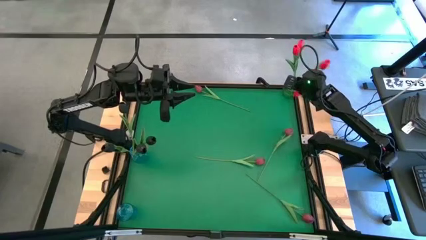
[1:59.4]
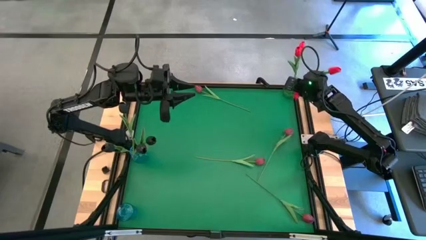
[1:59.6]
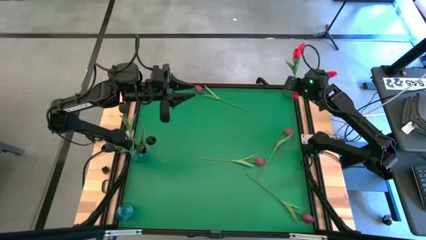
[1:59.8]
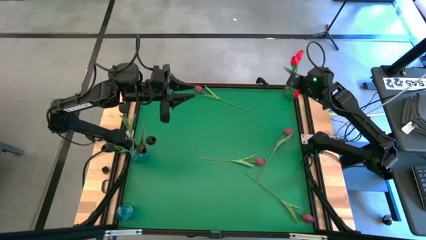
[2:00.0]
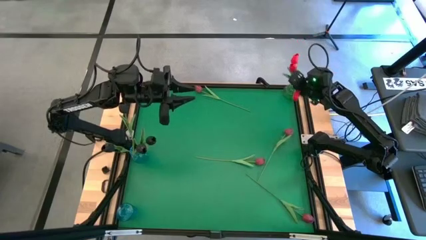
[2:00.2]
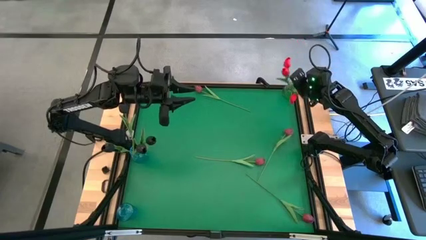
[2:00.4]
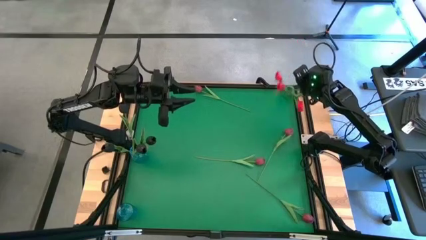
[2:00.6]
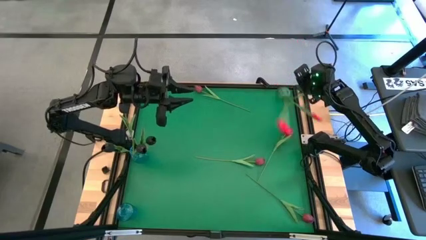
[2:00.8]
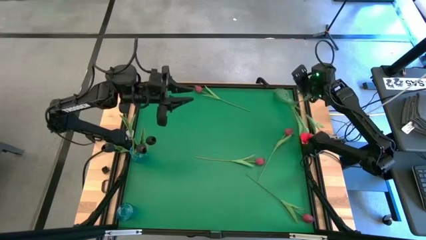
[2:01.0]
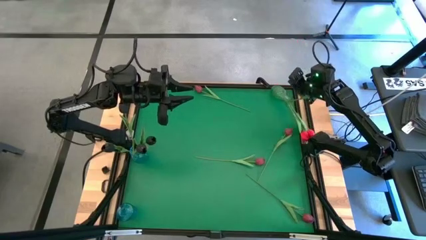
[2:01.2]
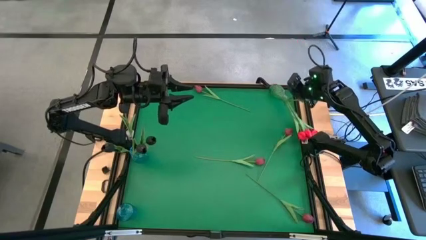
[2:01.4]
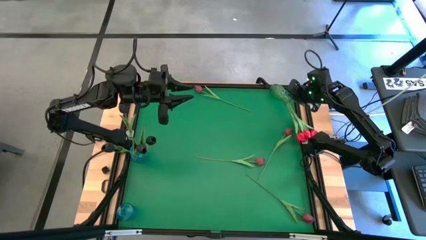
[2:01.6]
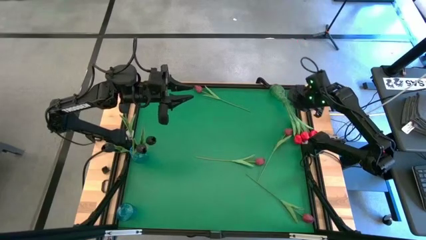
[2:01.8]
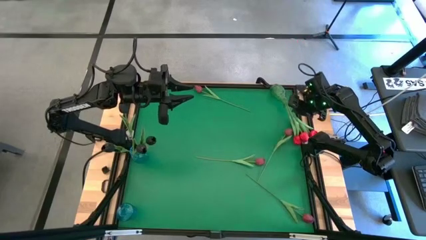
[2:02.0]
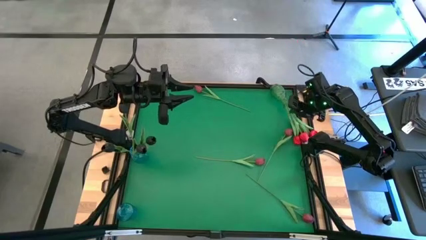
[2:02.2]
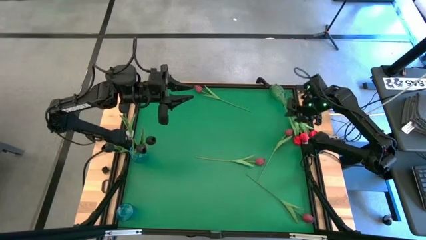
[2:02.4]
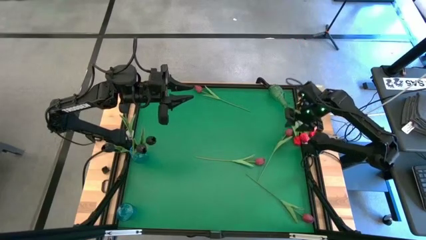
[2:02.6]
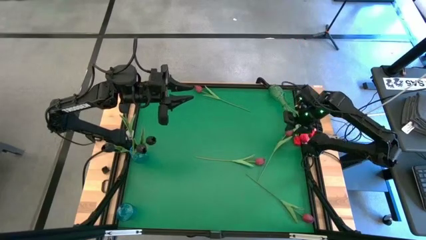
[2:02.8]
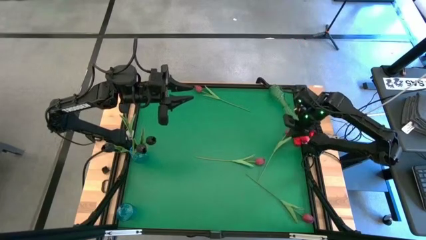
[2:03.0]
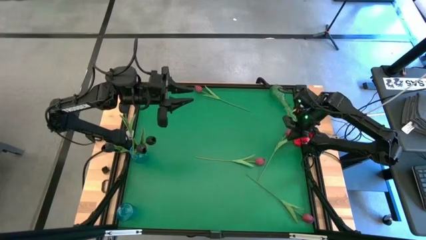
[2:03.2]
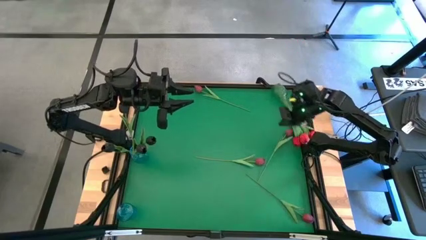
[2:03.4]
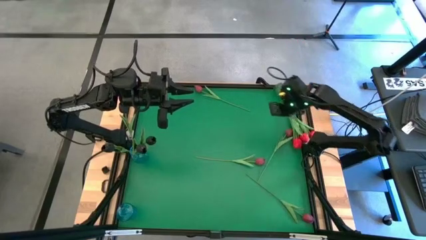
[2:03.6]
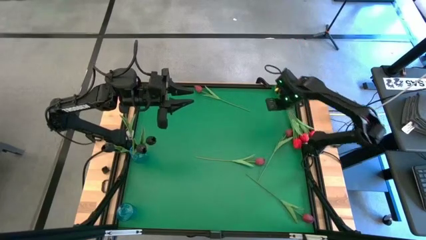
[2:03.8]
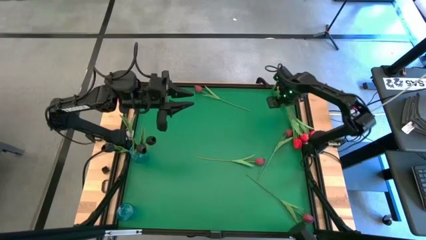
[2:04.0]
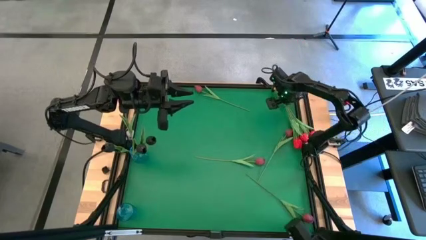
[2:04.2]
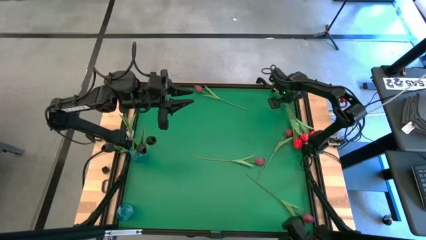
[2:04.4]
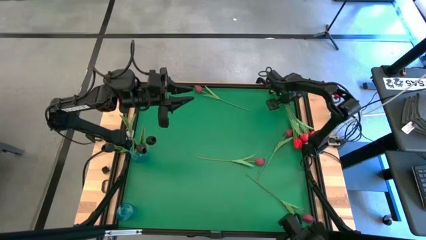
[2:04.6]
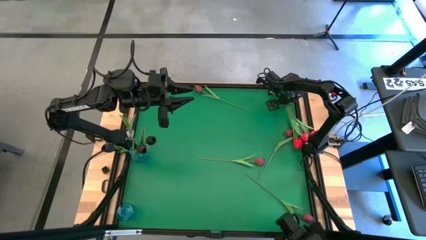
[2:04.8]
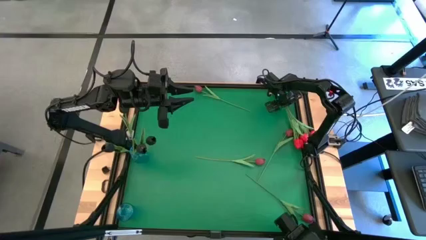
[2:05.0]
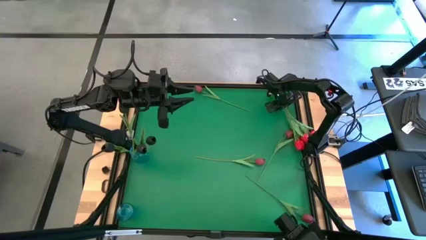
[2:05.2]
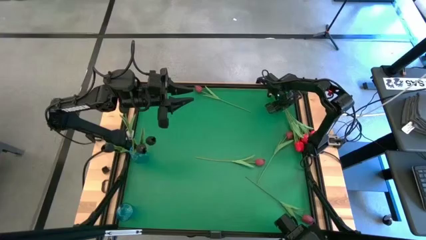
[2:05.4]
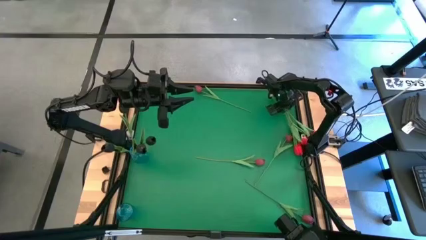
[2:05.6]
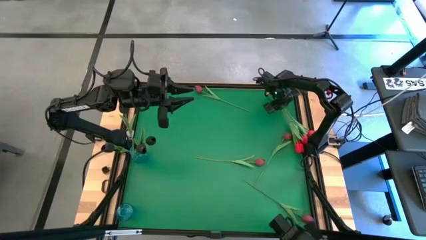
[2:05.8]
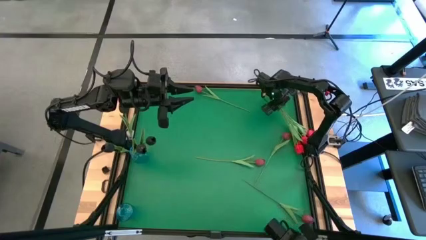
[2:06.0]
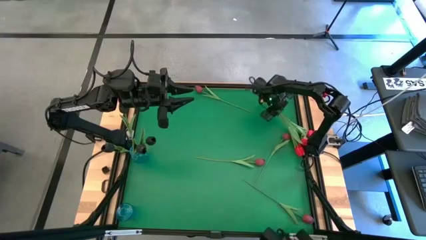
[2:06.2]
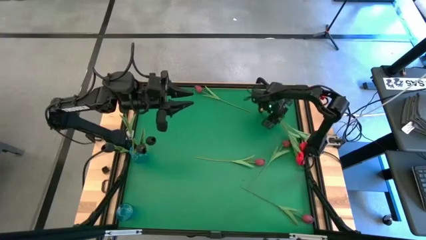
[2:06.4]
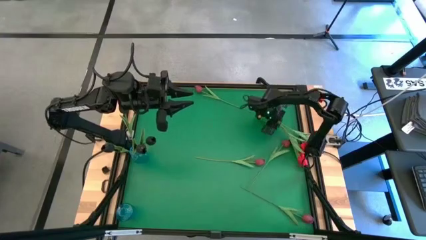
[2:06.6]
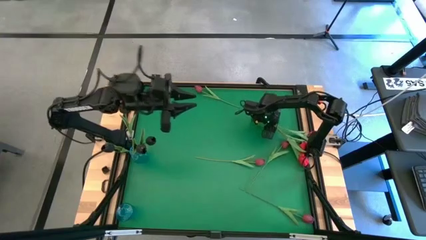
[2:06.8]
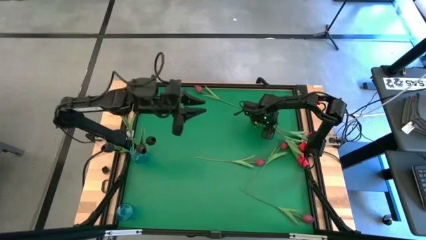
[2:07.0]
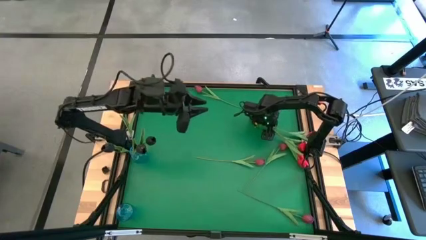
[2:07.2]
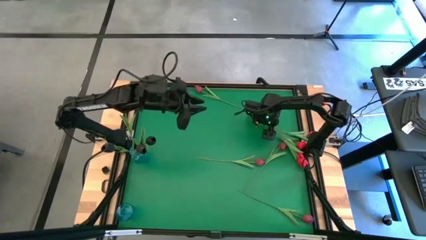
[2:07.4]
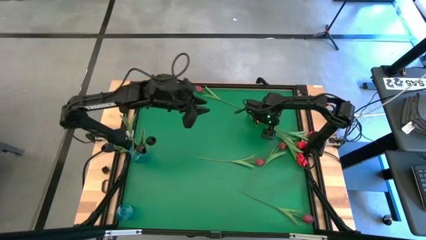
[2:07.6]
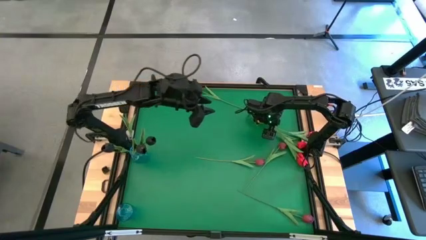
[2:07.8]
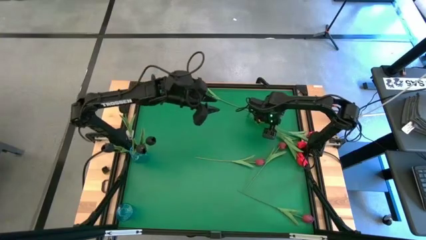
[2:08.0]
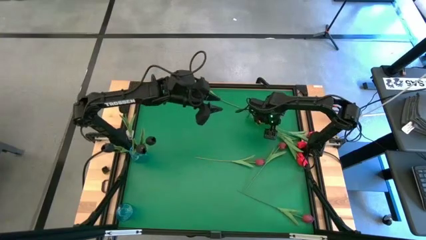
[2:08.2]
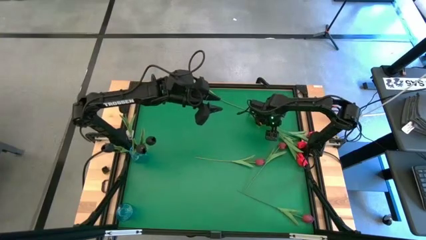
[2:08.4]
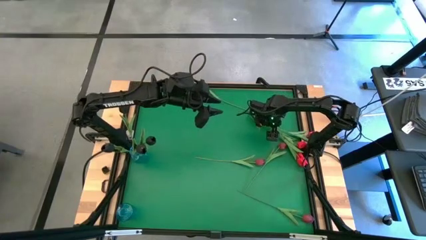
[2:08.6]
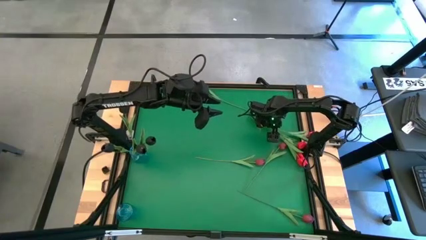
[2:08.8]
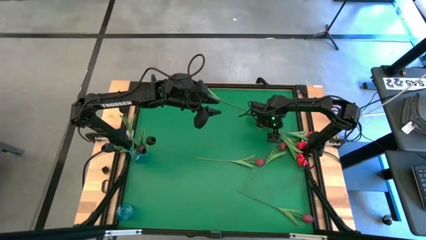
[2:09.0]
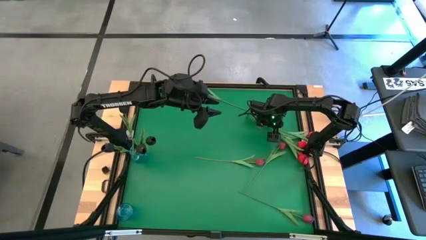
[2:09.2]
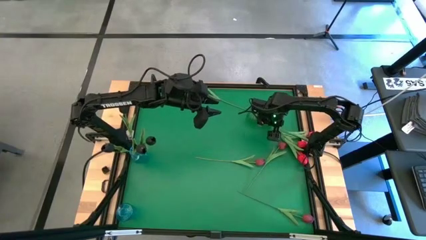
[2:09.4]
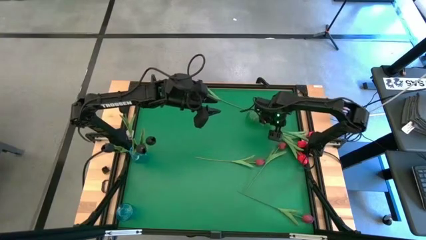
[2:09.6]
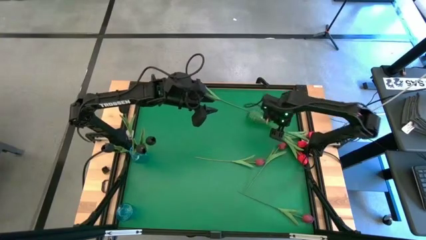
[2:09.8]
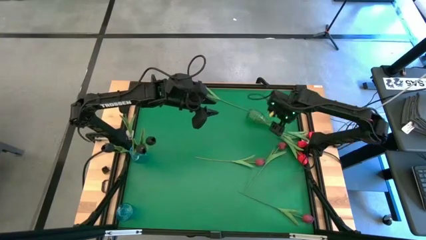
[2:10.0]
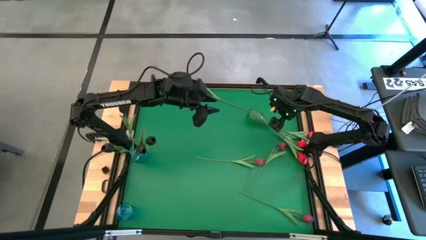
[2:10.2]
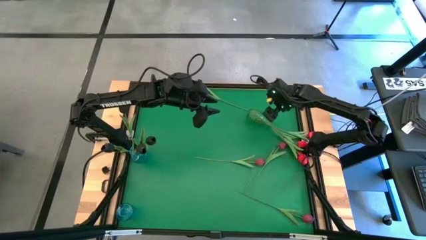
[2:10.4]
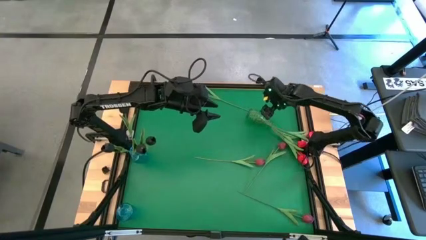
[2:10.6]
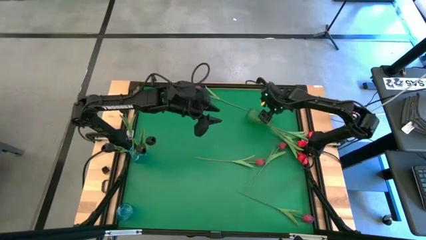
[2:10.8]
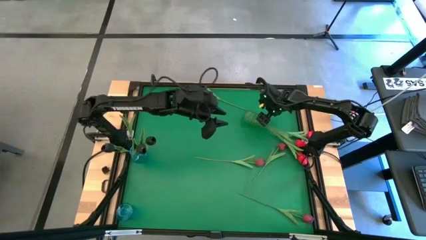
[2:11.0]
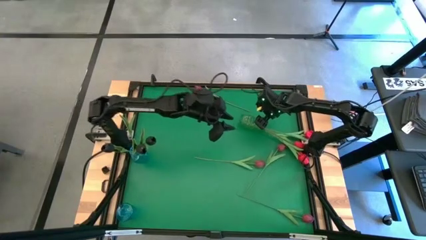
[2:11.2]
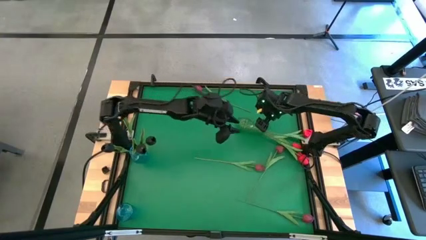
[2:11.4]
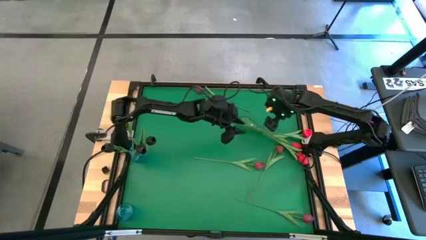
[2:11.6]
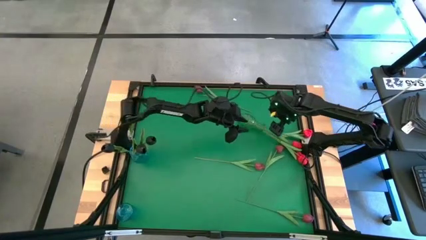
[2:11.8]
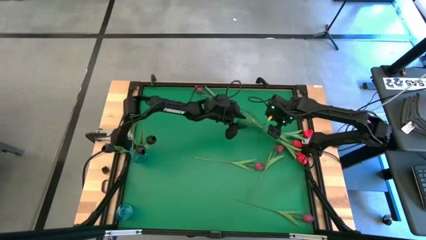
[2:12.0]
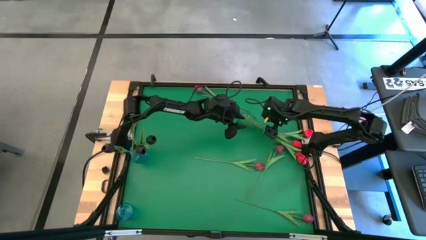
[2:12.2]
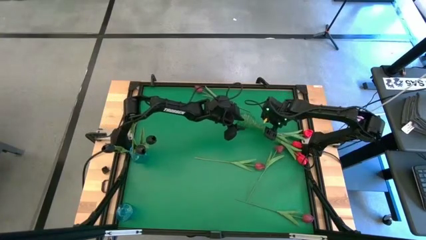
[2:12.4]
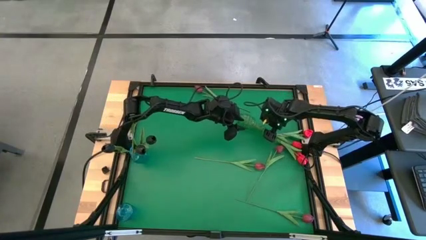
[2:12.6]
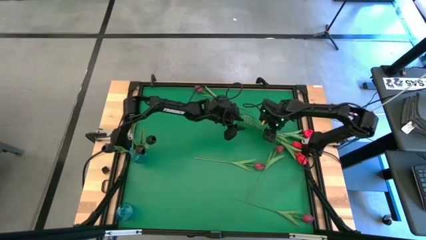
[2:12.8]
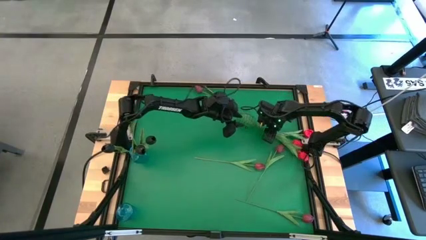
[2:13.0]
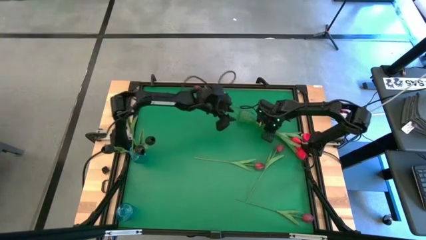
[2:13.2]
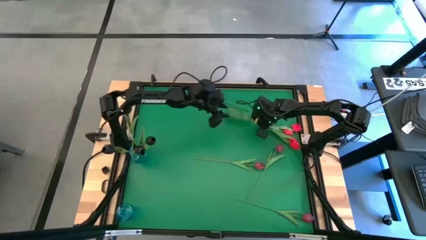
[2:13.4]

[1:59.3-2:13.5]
Task: Sort flowers into vase by color
Adjust the green vase on the top right of the table

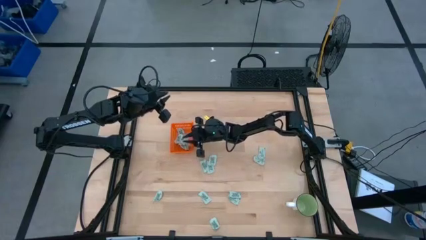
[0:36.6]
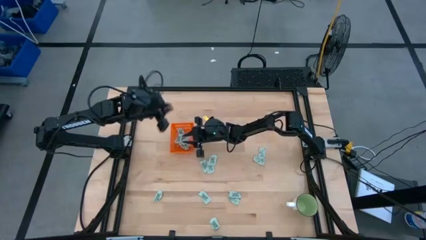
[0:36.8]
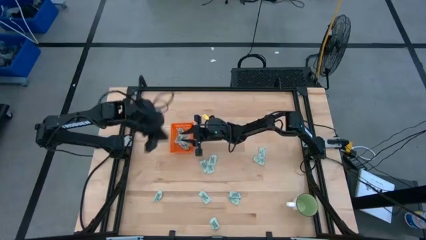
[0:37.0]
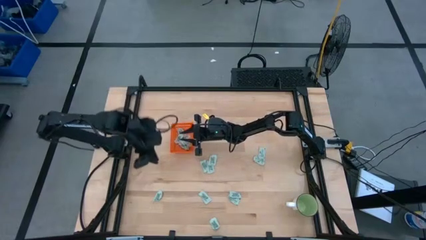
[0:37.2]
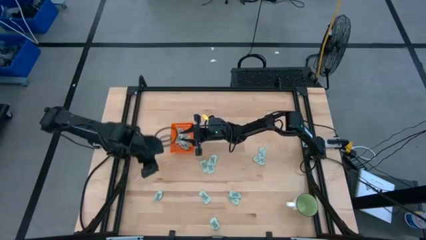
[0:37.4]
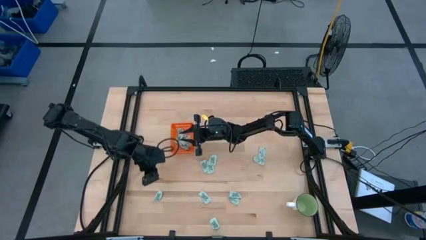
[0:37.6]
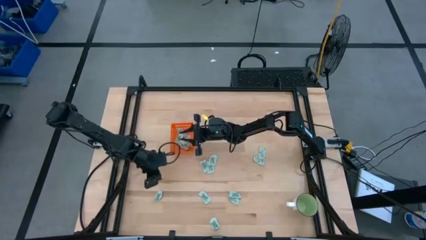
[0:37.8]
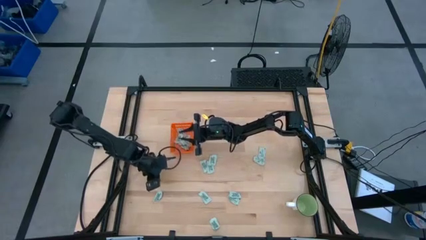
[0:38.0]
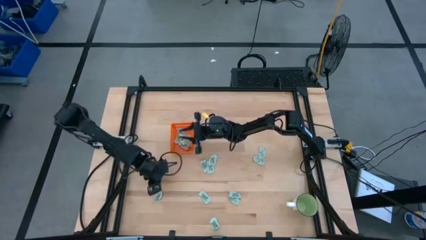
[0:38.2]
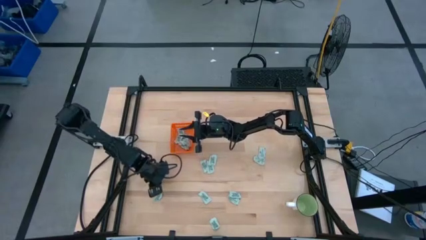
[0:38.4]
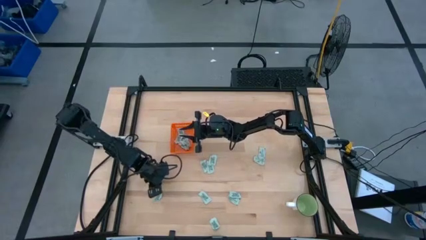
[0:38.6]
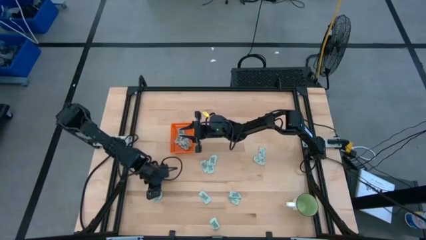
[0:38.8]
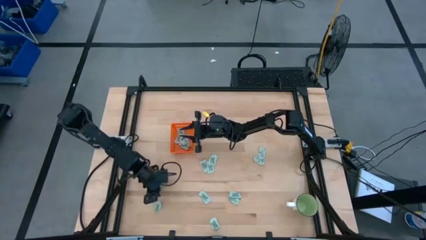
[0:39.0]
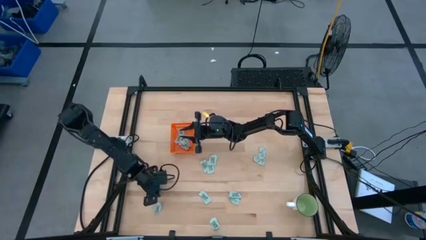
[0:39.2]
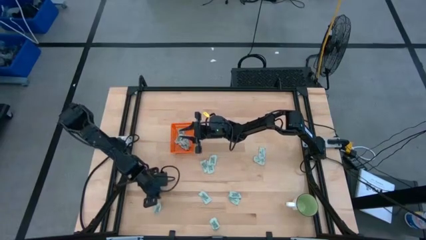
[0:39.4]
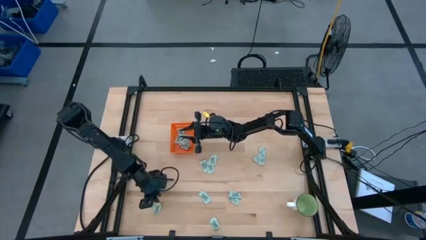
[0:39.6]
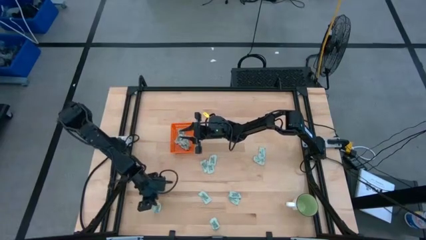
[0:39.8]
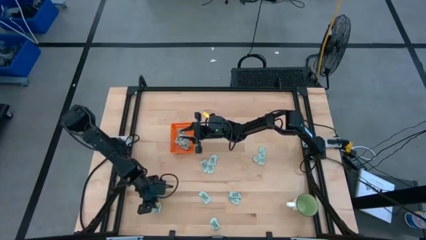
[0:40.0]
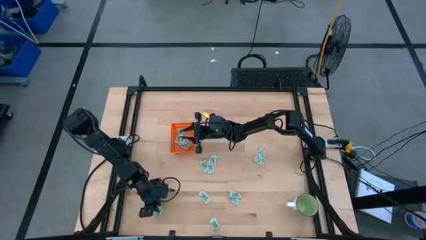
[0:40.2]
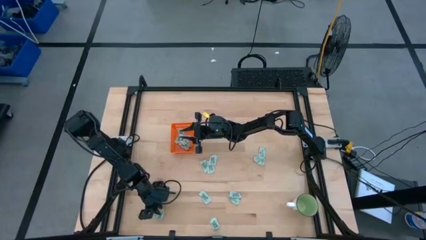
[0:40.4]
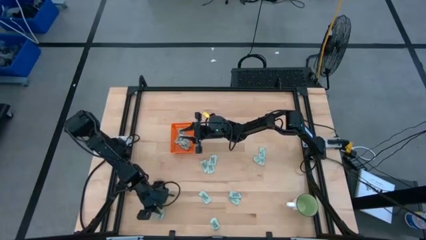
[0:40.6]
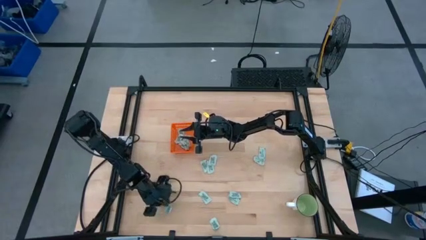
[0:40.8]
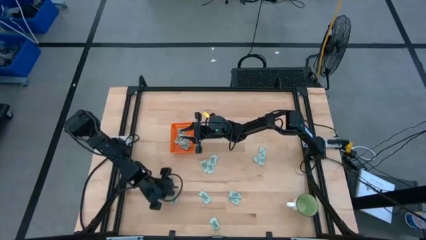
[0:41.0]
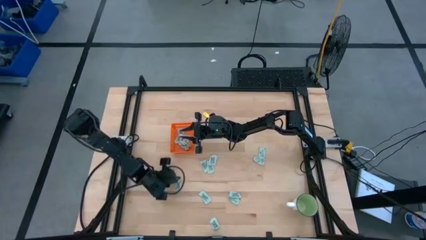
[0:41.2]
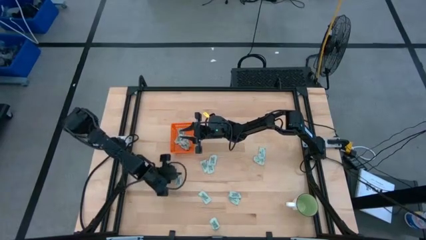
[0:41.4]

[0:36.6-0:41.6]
Task: Pick and place Stevia / Truvia into bins
Put the green stevia packet into the orange bin
